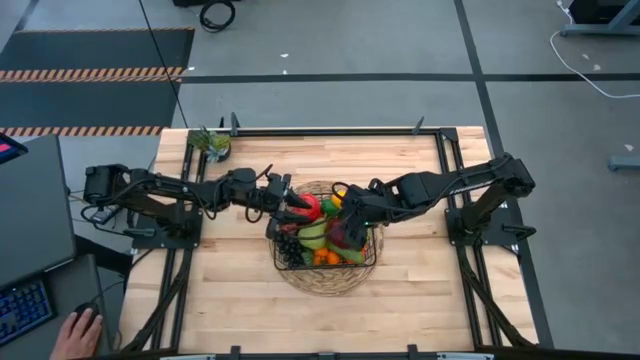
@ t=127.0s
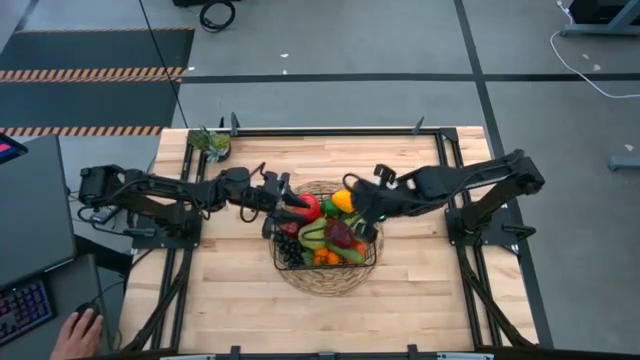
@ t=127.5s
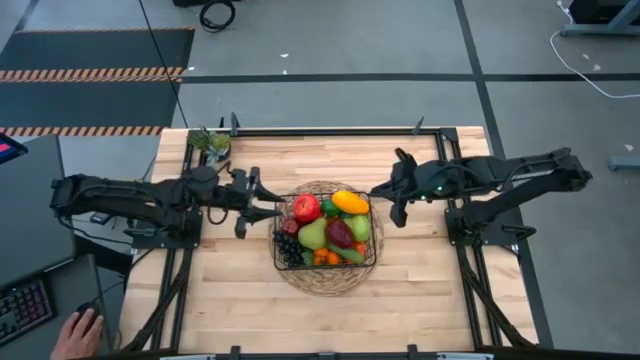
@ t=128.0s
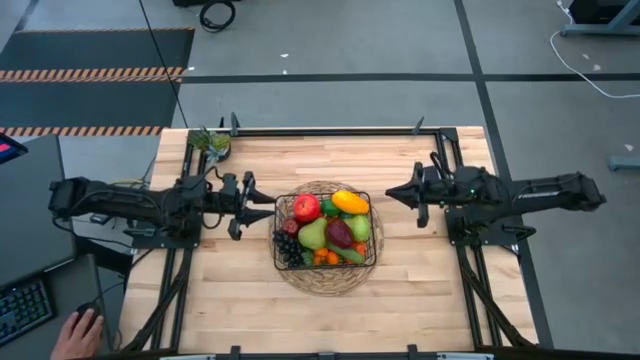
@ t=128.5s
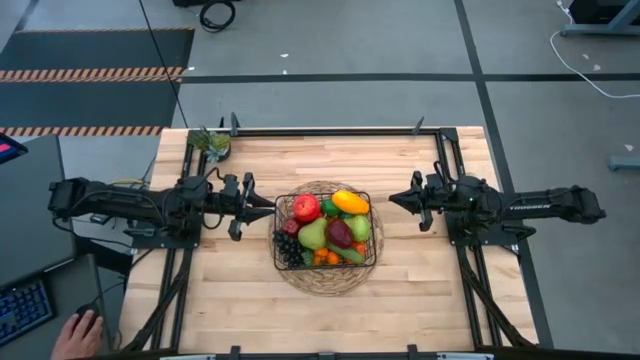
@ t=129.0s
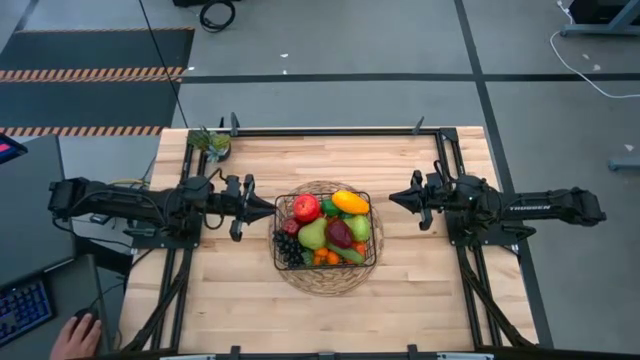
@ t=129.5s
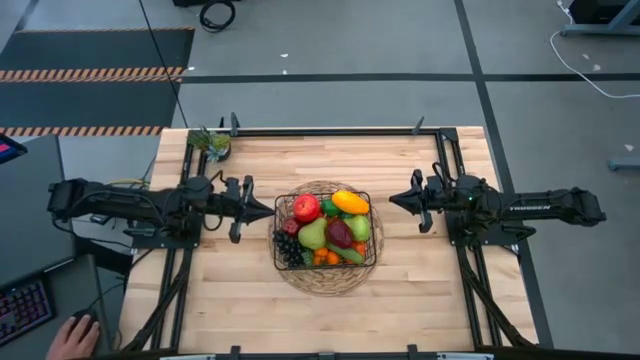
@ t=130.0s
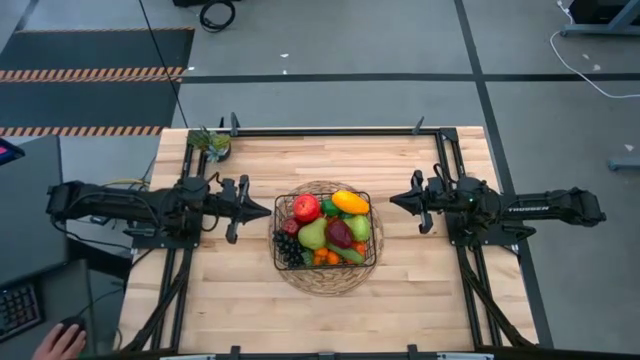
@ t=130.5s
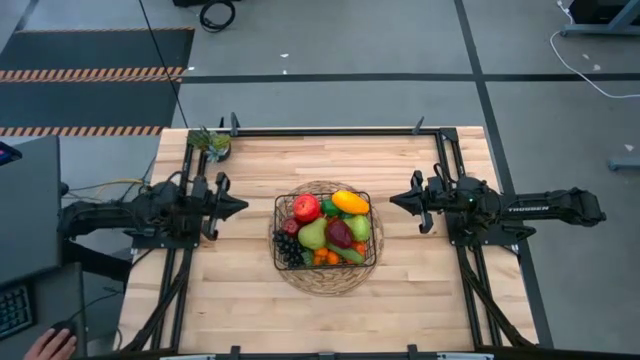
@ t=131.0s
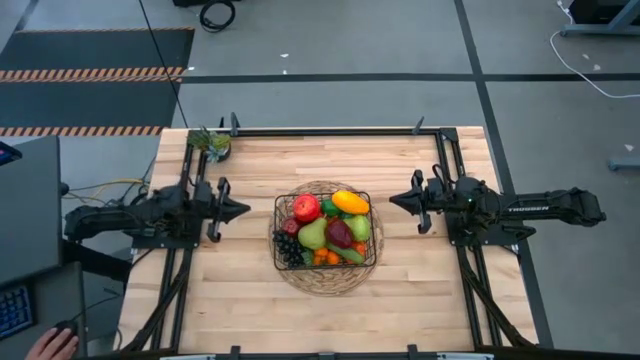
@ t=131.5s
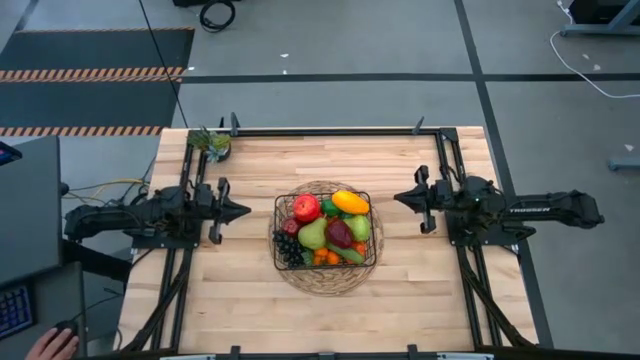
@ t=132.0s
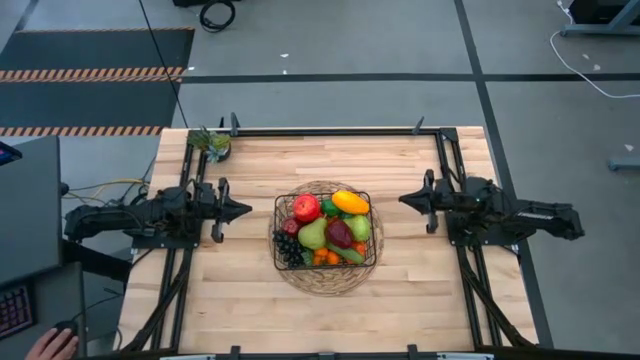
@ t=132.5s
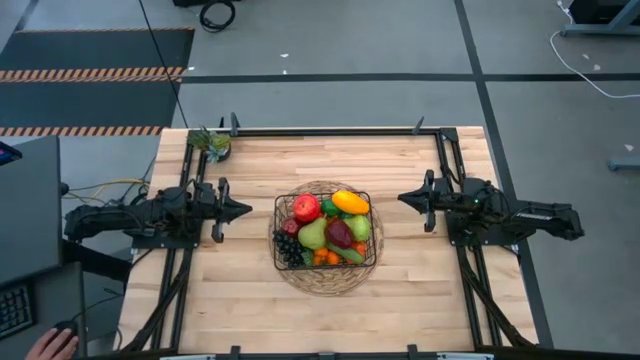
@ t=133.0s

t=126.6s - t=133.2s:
Task: Build produce basket
Return to Home Position

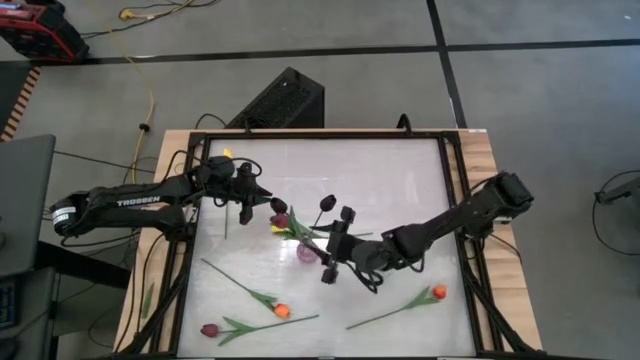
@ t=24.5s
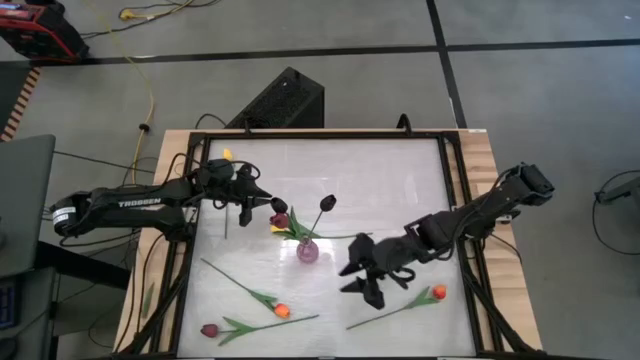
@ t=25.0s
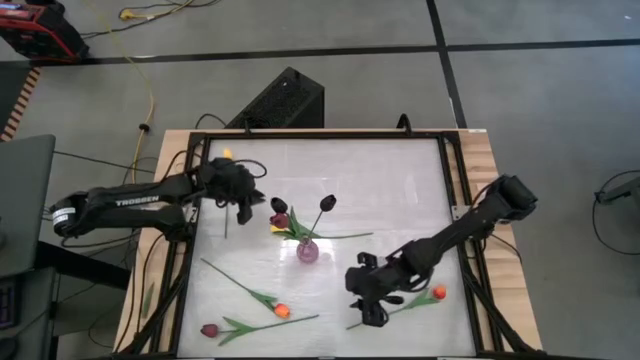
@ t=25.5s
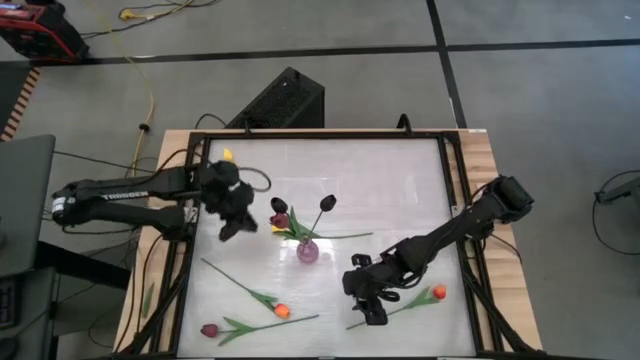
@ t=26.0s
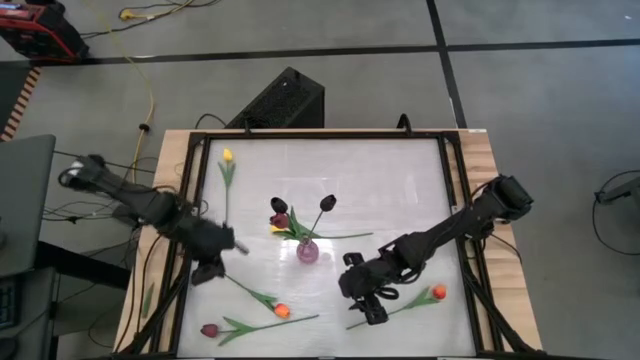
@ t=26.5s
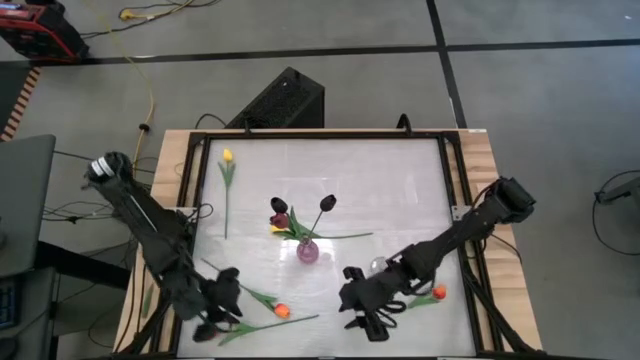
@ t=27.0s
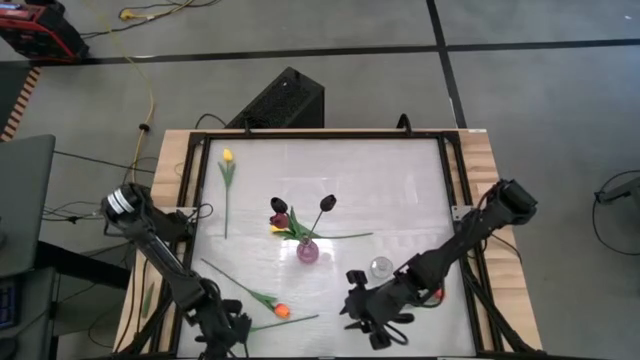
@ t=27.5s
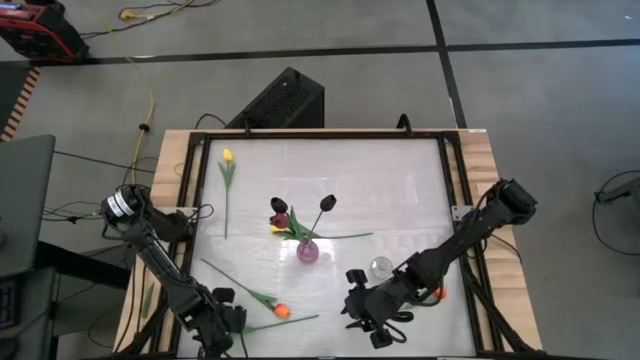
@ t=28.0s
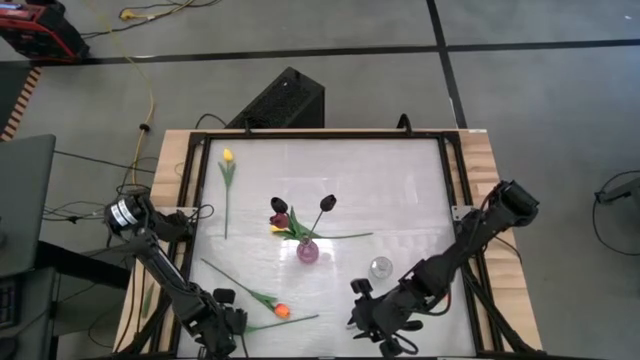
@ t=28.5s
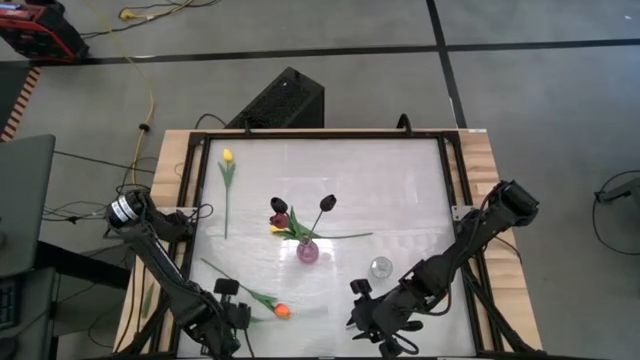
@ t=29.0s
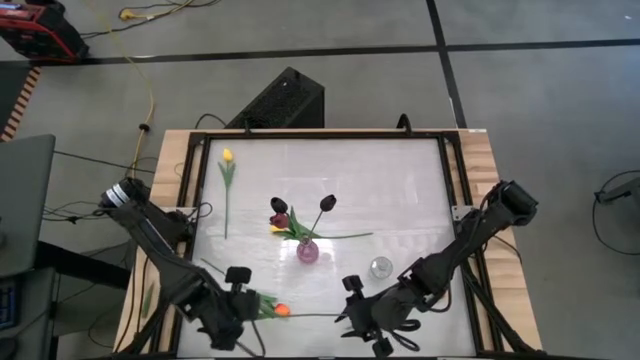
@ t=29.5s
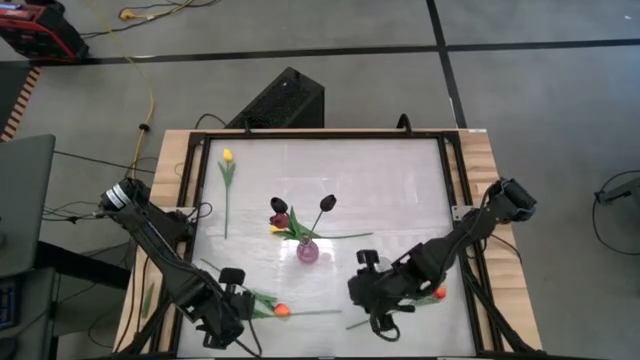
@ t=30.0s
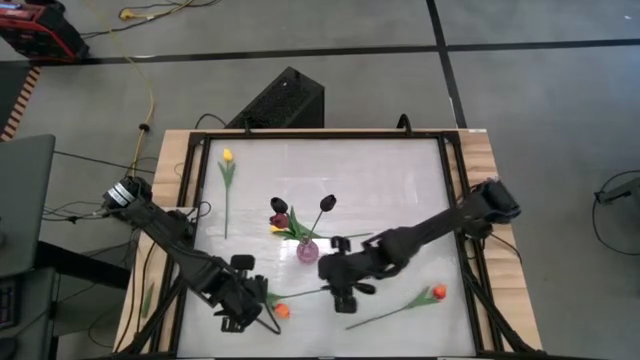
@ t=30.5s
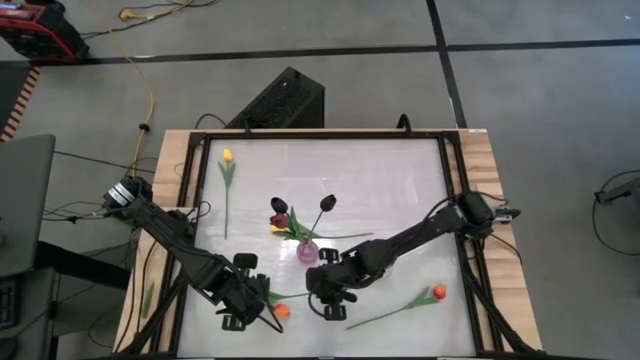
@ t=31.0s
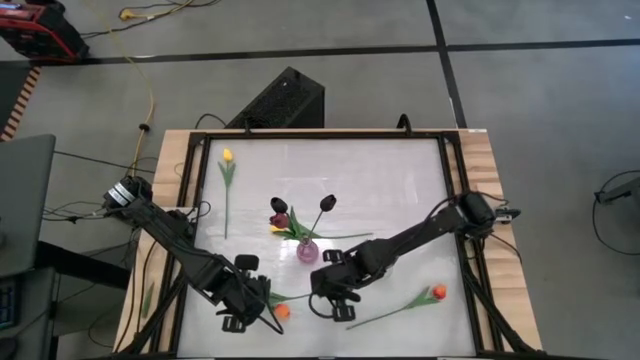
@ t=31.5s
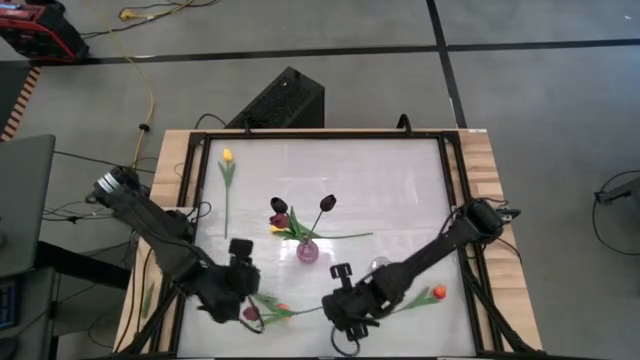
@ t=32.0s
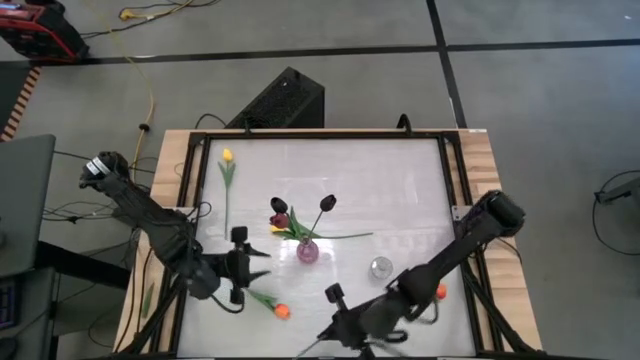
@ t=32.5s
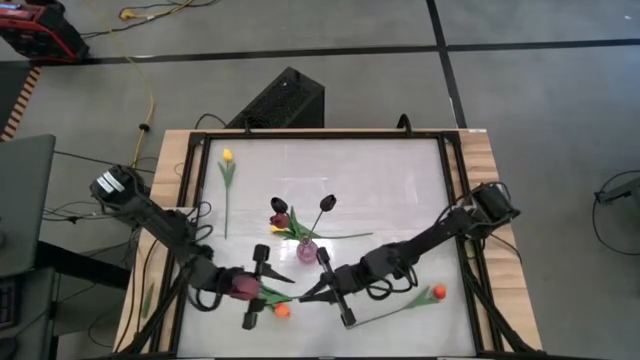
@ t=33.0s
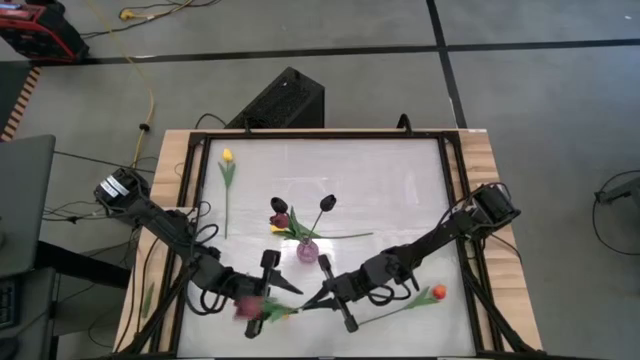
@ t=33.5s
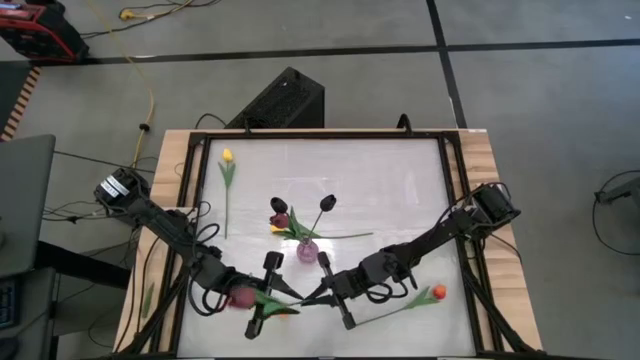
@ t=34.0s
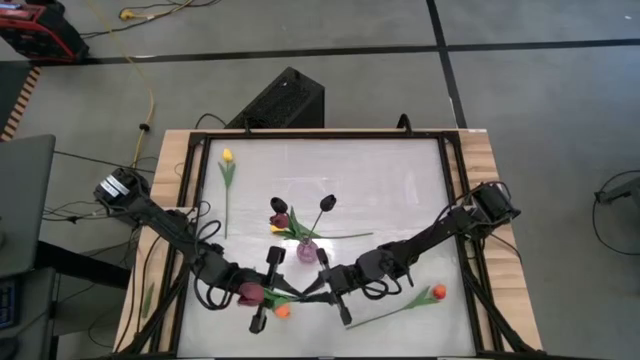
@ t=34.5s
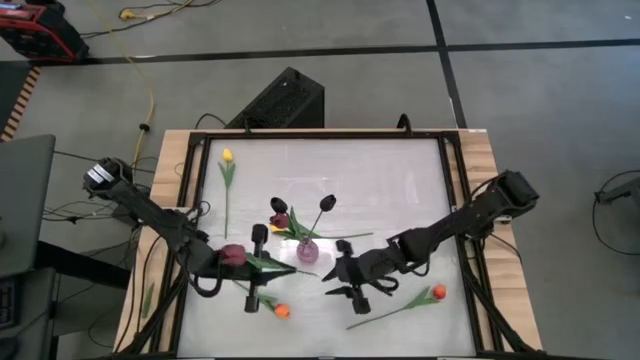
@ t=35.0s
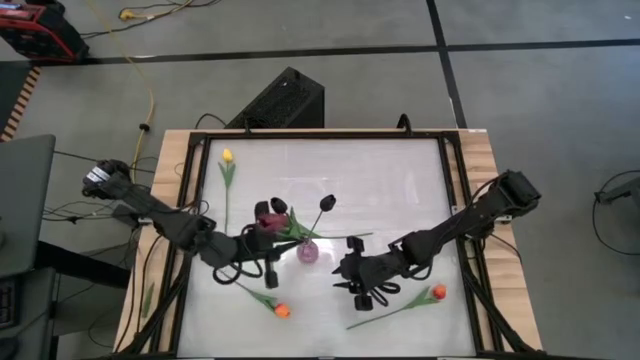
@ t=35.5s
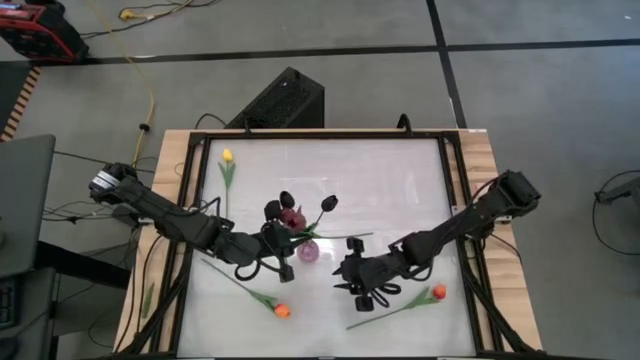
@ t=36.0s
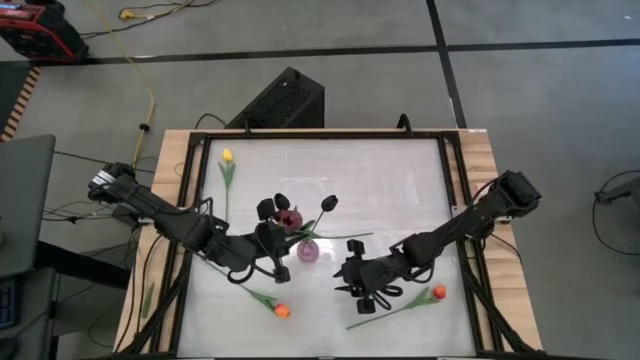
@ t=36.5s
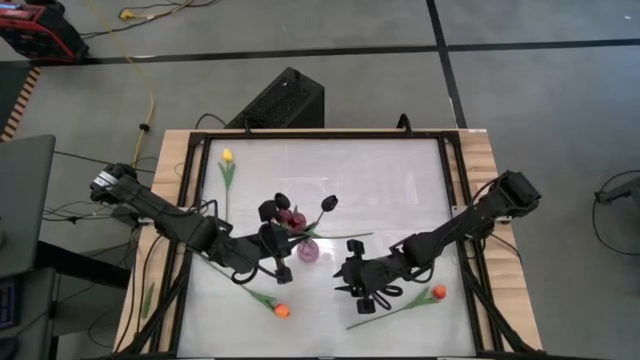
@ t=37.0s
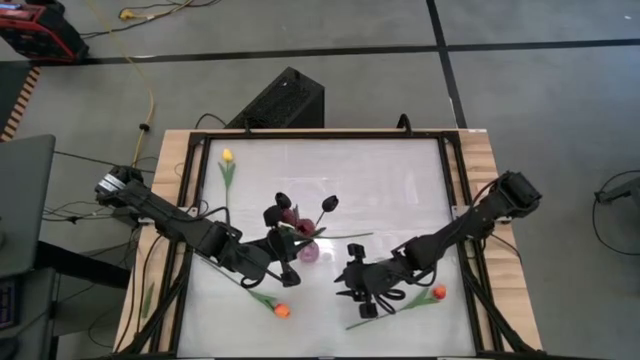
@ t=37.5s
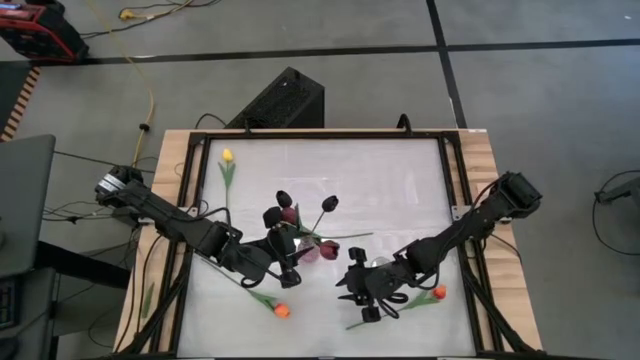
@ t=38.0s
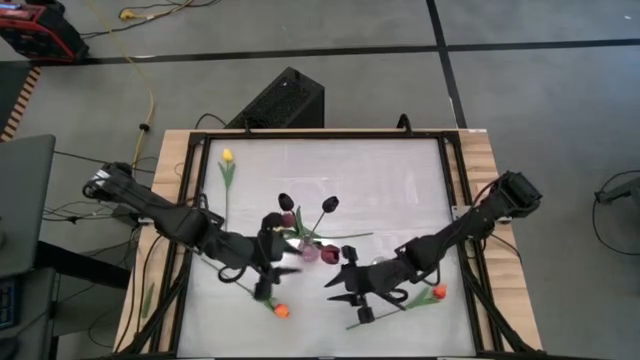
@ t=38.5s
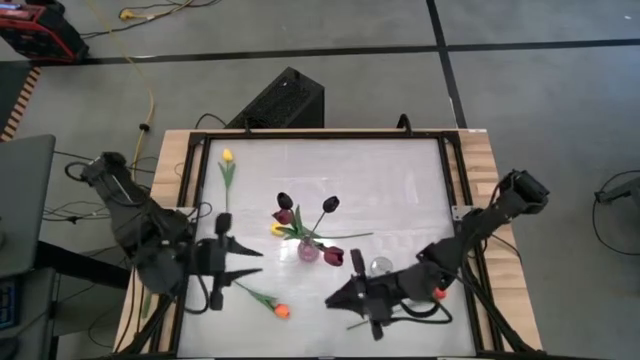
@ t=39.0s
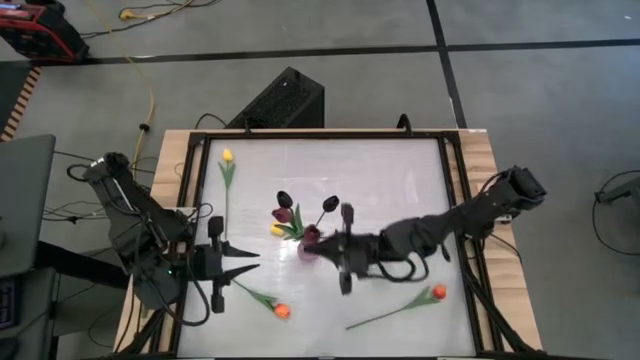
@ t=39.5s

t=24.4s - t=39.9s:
Task: Sort flowers into vase by color
Put the red flower into the pink vase
